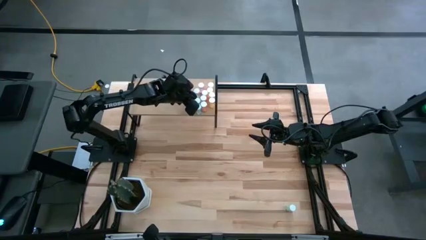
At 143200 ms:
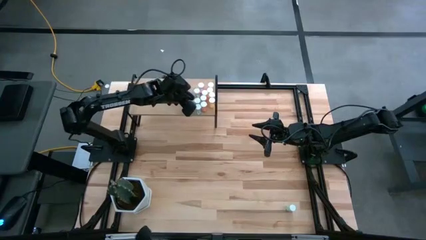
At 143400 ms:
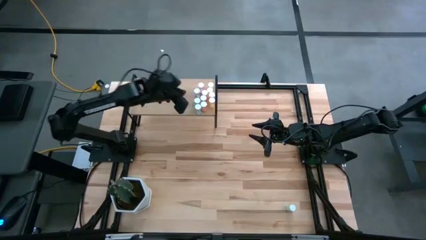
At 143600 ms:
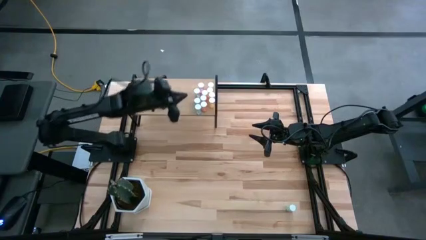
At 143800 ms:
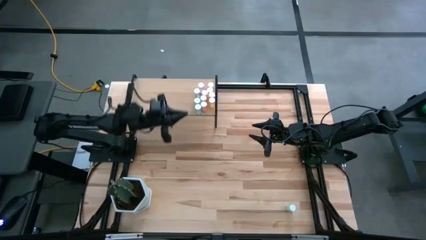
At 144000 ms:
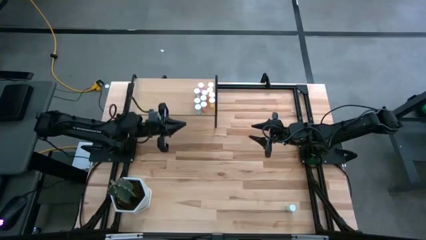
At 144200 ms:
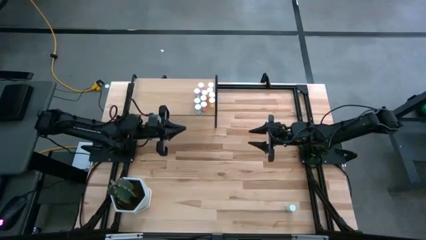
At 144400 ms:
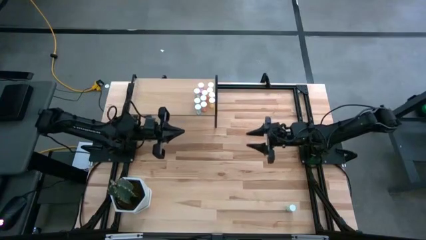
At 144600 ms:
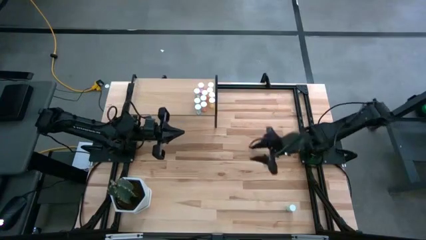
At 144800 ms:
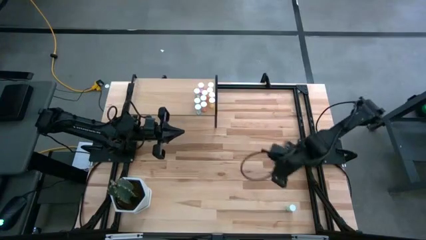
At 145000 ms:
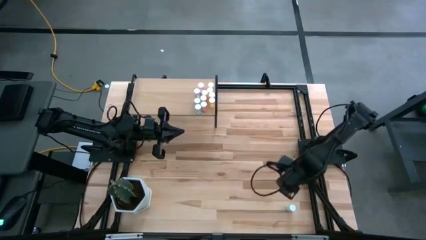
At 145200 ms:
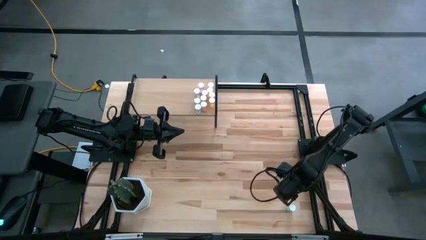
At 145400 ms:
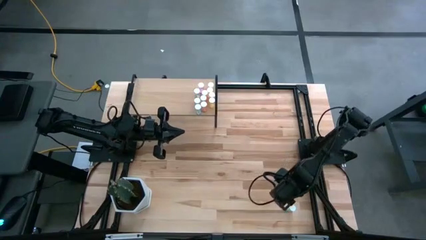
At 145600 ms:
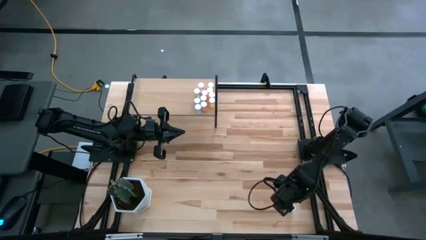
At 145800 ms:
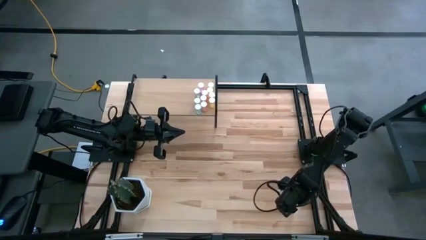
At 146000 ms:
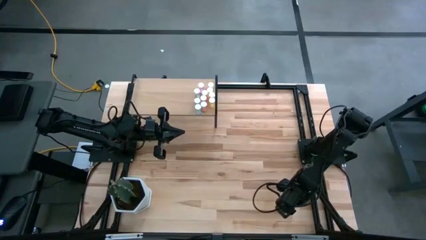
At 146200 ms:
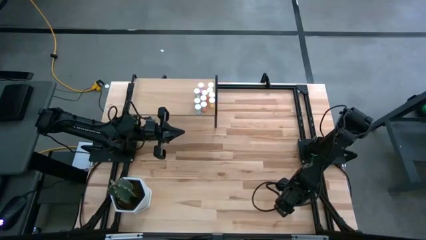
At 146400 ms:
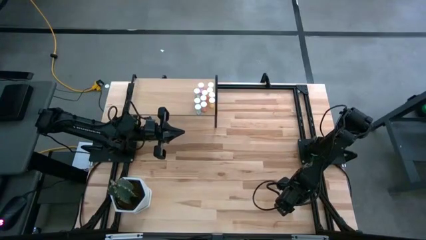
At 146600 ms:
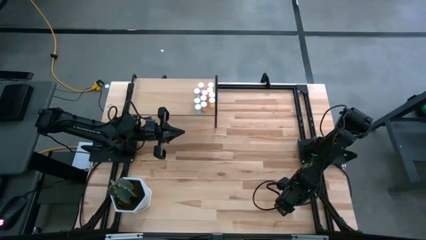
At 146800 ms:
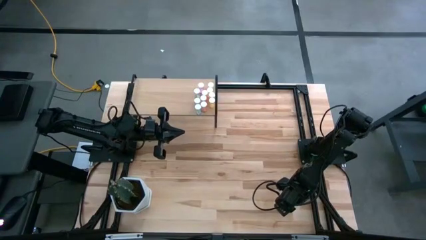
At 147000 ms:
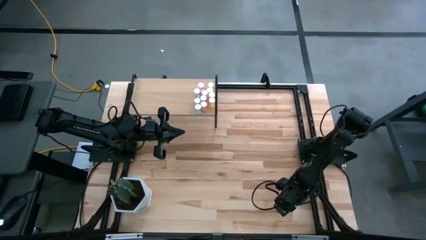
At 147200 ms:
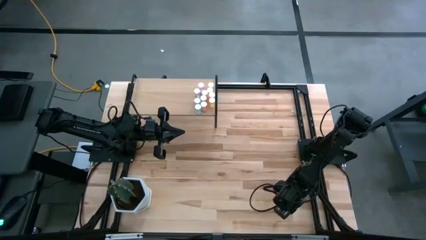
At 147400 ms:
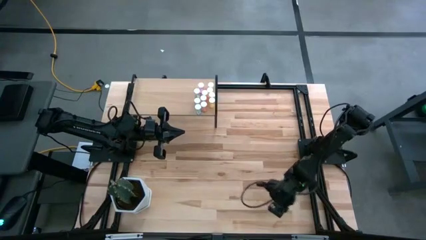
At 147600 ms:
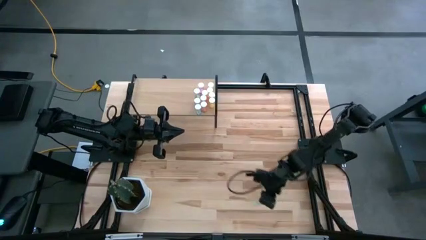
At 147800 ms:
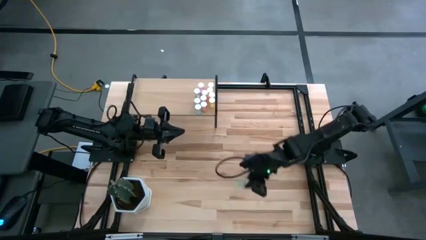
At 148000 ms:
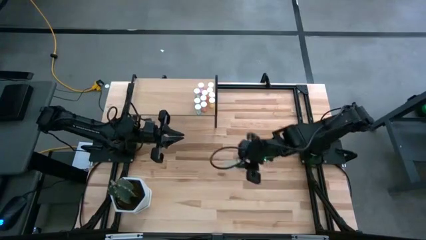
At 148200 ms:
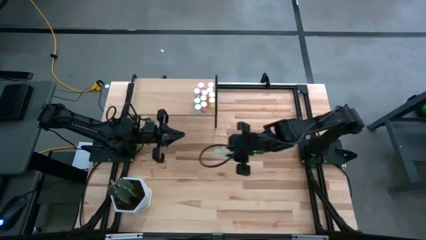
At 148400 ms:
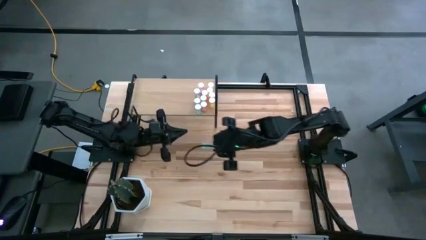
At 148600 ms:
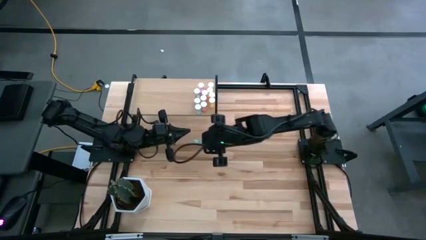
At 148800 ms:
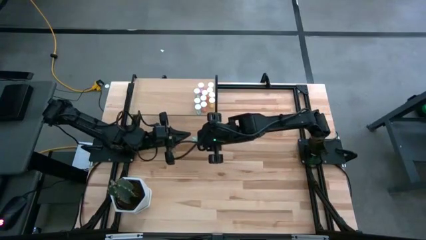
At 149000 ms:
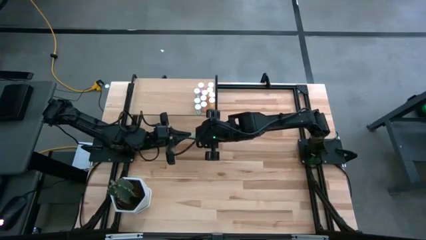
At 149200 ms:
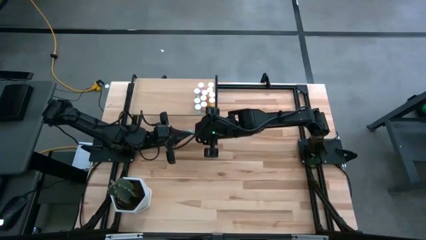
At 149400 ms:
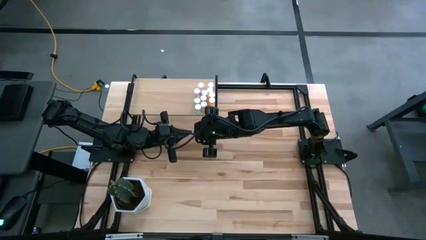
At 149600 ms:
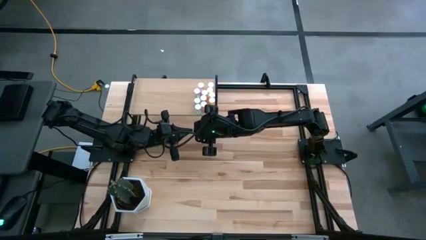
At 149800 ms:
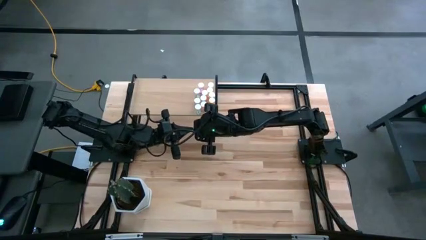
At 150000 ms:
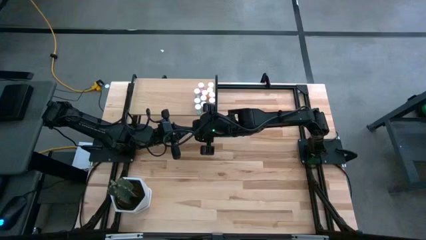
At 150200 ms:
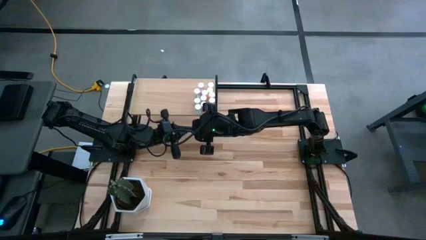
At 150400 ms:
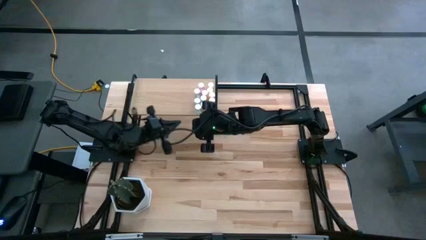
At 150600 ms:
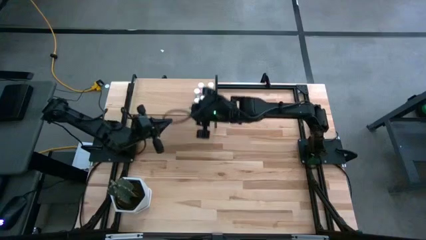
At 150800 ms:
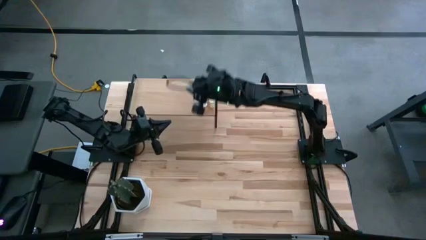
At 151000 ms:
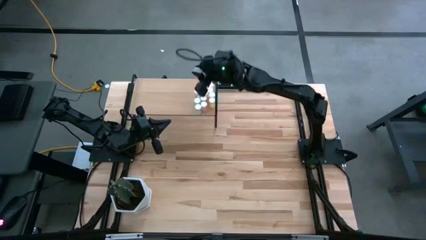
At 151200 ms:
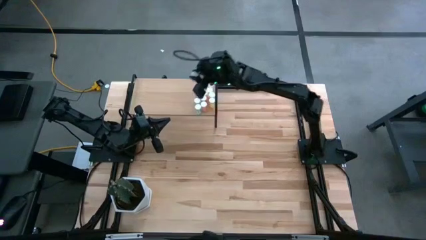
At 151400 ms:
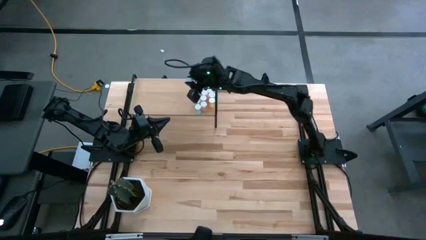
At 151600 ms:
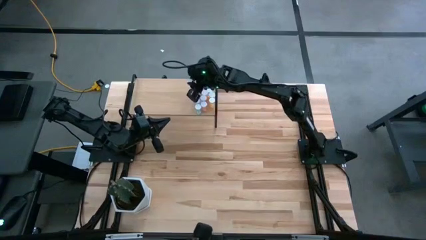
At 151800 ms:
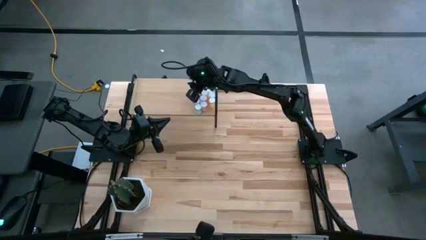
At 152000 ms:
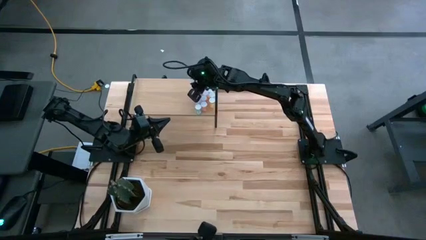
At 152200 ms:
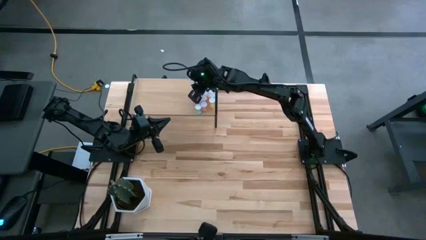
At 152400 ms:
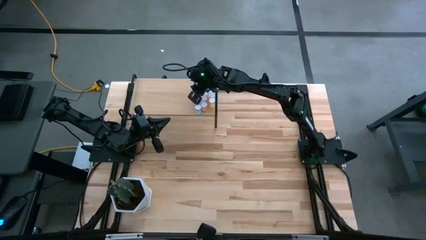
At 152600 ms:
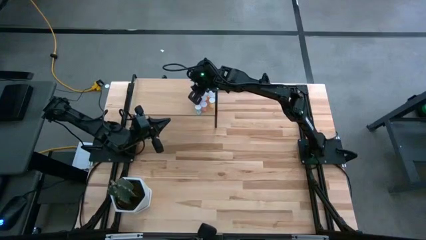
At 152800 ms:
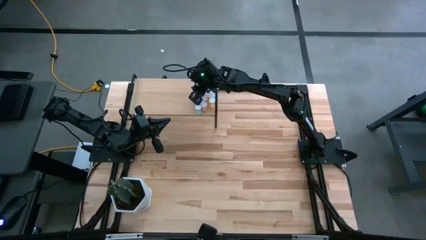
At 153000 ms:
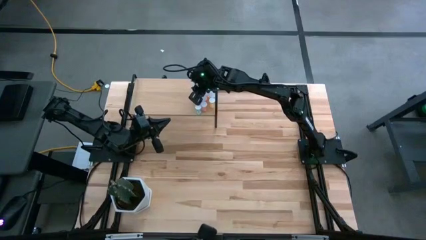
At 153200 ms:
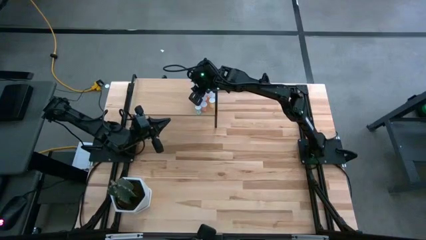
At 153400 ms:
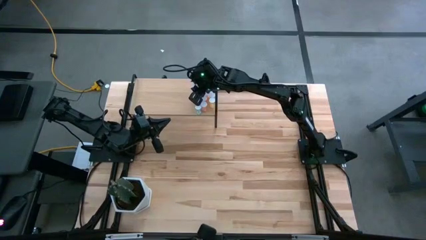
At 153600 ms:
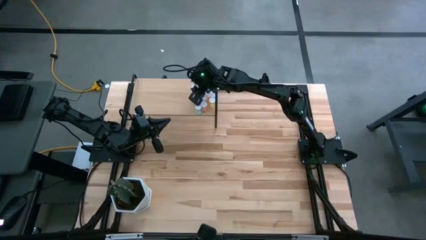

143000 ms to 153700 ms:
Task: Pick and place medicine bottles onto shelf by color
Put the green pill bottle on the shelf

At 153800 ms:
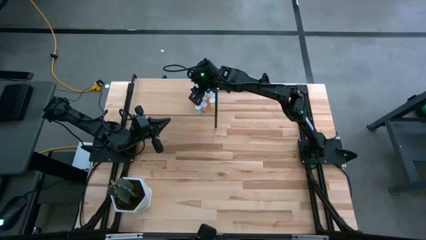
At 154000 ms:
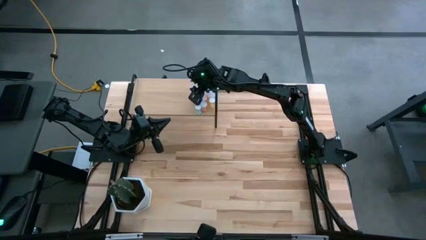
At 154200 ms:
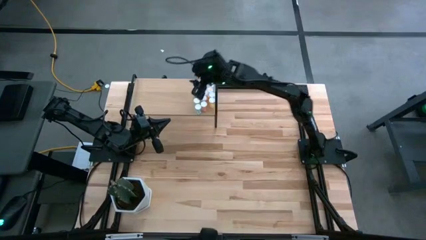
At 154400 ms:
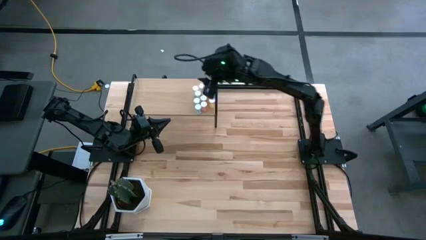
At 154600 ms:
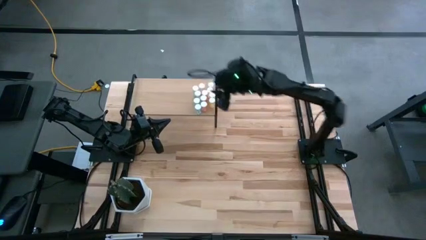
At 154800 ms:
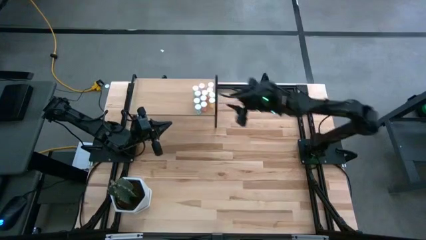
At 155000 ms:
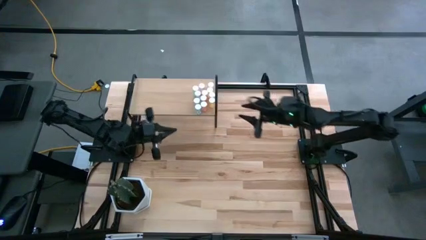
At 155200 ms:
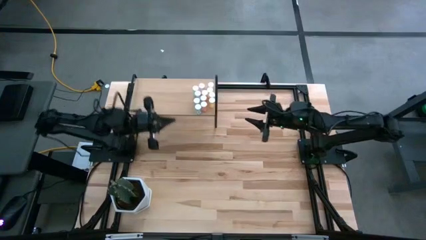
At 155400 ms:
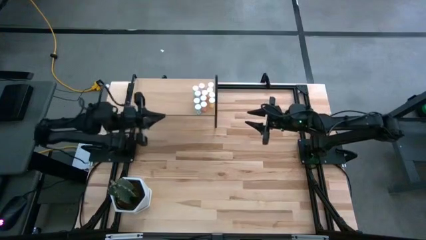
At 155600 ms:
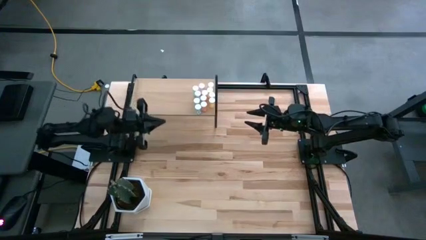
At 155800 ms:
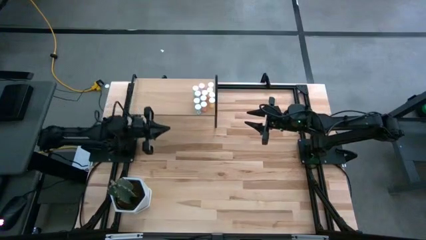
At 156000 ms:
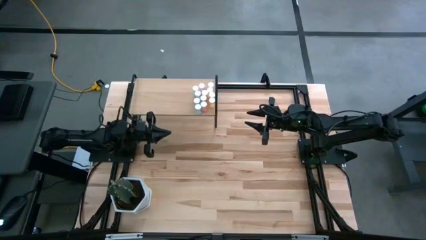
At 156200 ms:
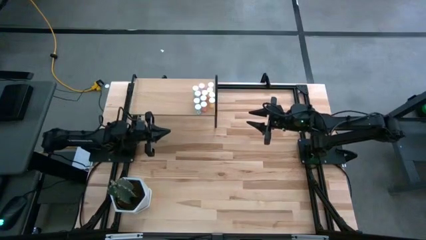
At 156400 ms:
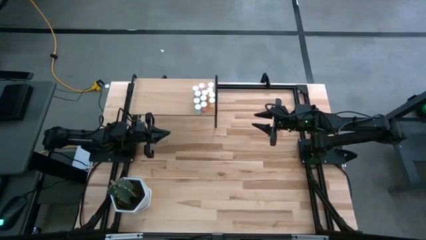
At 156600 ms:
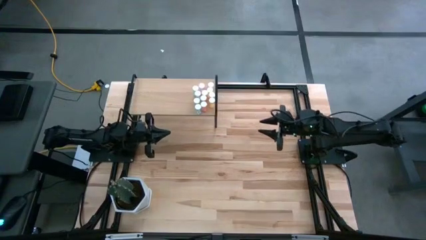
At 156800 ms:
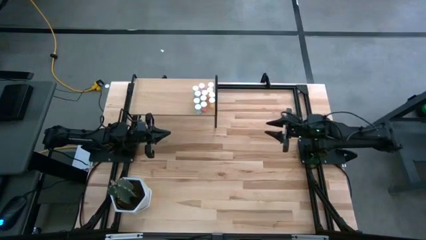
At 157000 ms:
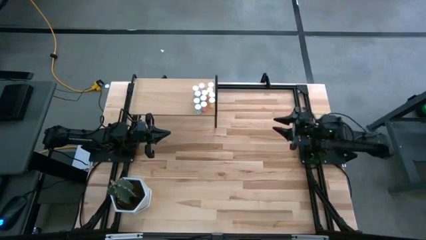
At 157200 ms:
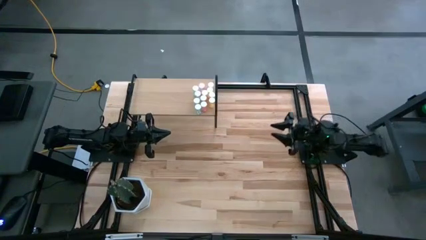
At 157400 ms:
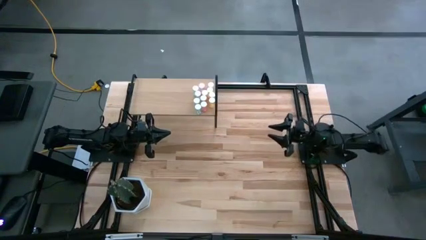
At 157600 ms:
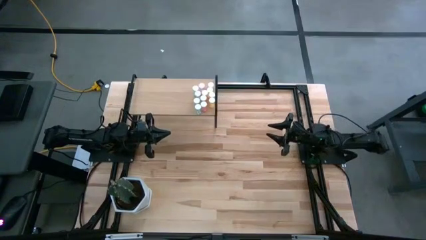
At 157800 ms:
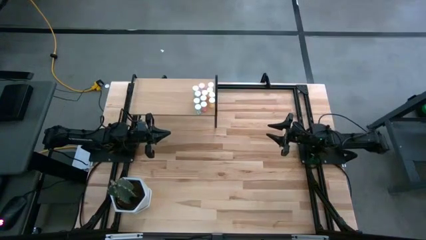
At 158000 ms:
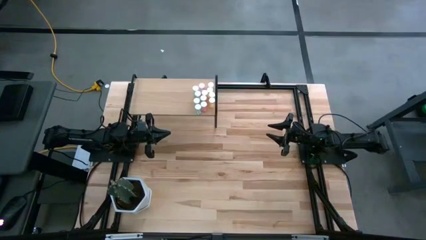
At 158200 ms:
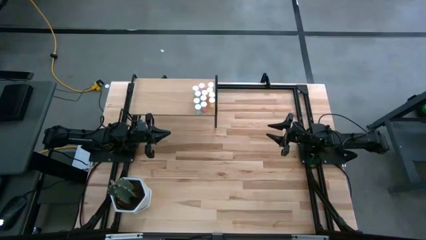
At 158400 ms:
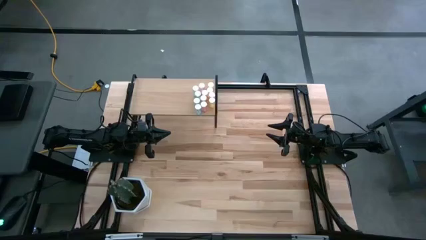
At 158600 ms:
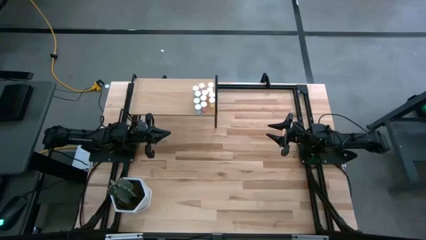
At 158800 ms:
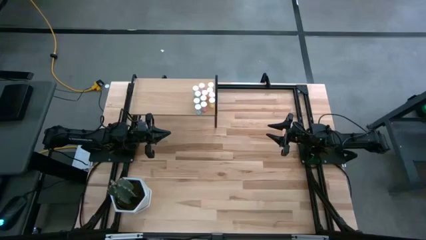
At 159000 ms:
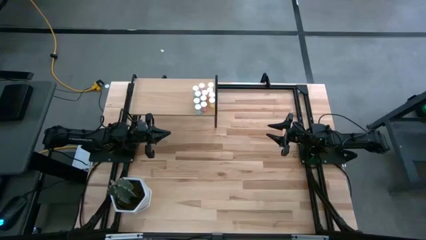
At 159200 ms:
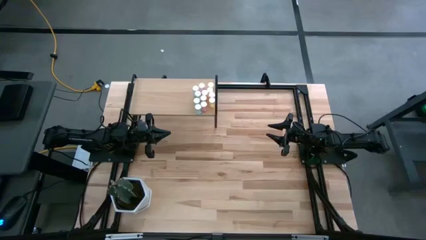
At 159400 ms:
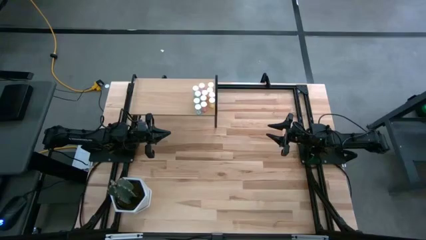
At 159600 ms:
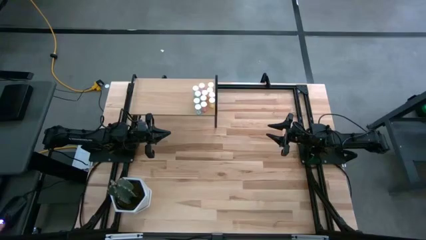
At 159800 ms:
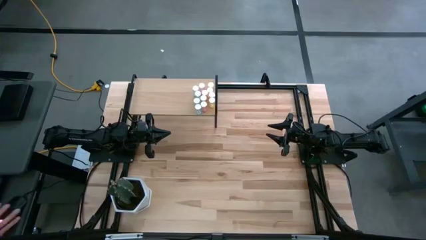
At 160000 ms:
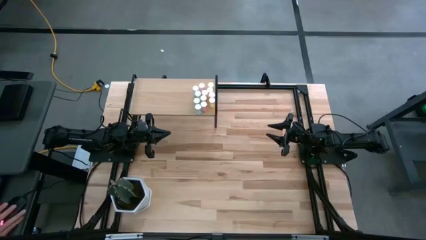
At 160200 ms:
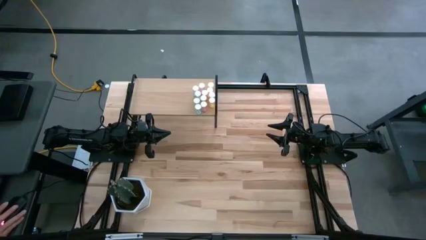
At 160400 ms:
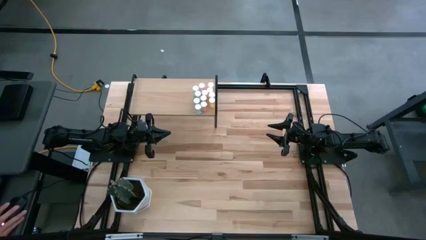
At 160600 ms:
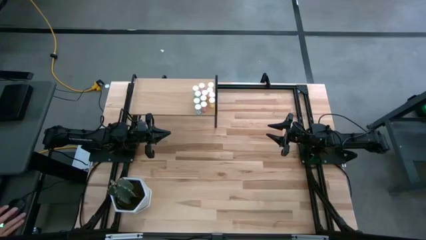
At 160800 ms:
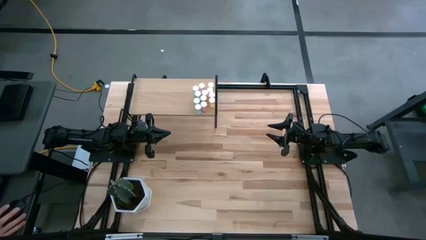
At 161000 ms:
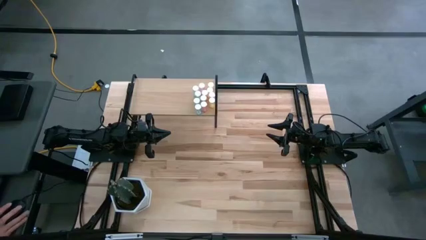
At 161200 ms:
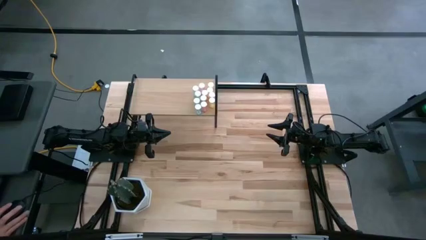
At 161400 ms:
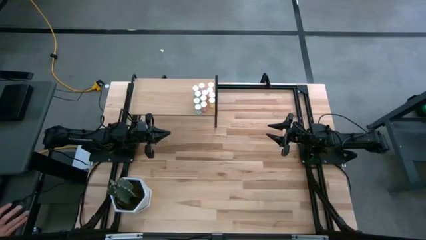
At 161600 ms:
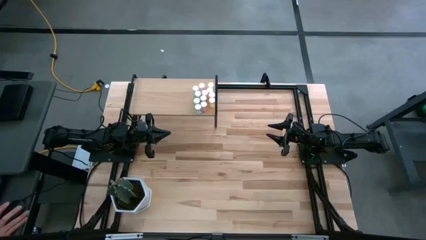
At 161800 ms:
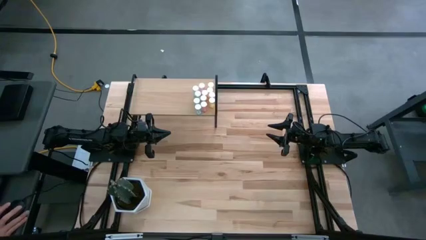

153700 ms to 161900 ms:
Return to Home Position
